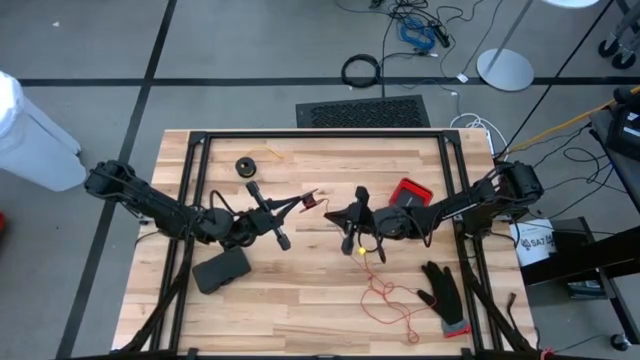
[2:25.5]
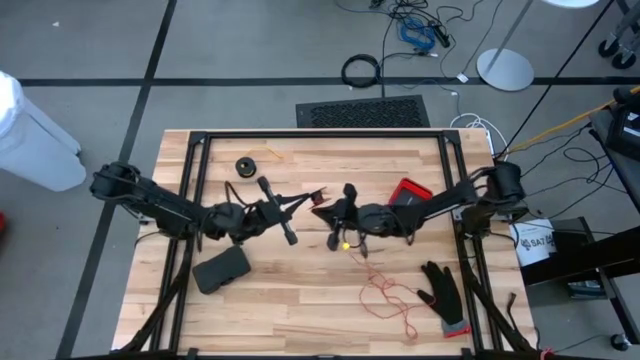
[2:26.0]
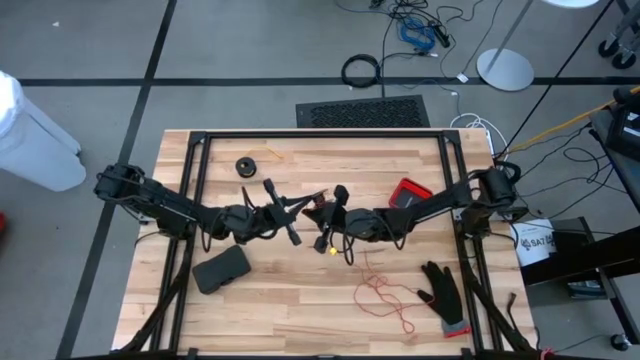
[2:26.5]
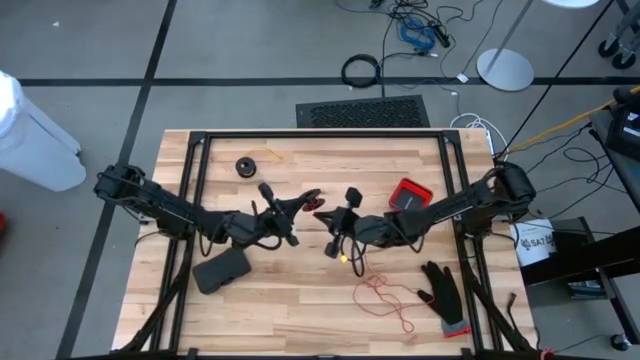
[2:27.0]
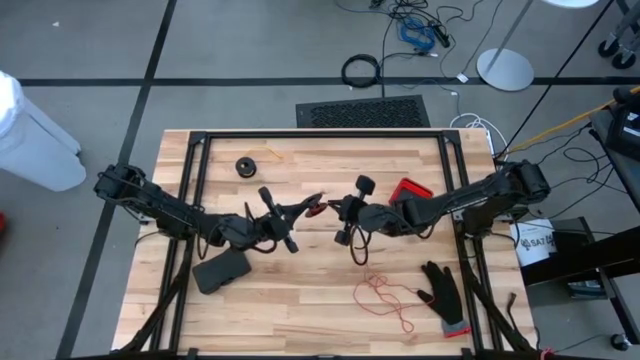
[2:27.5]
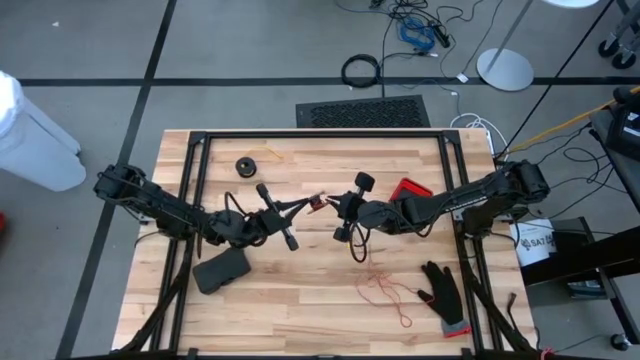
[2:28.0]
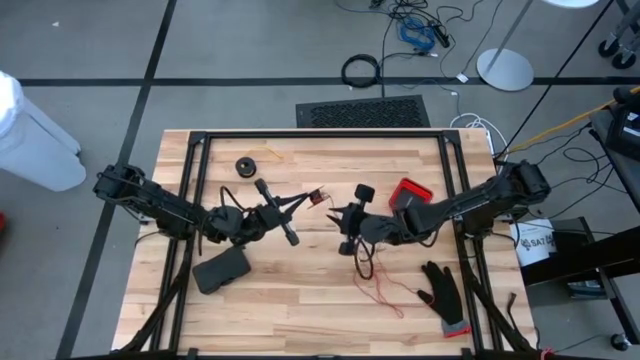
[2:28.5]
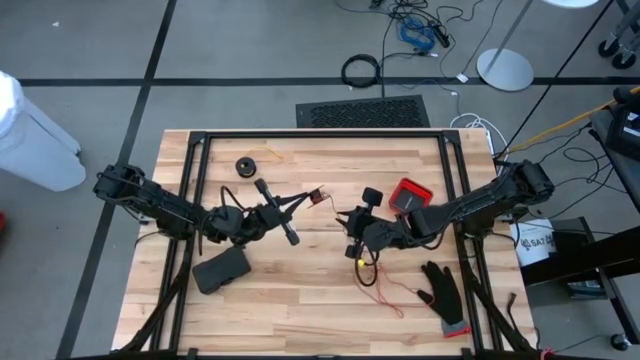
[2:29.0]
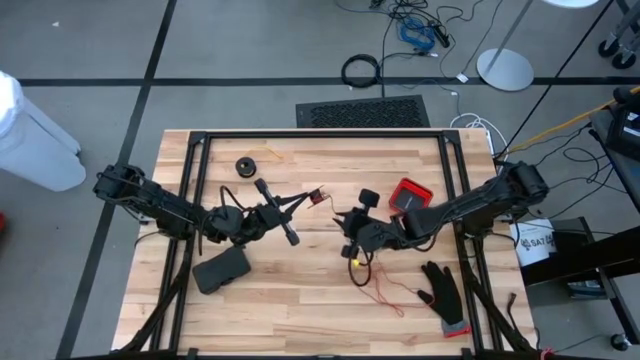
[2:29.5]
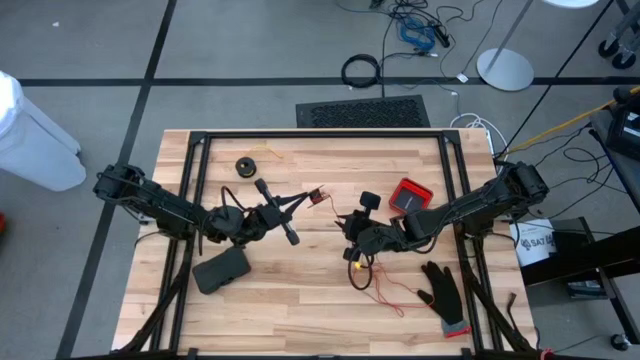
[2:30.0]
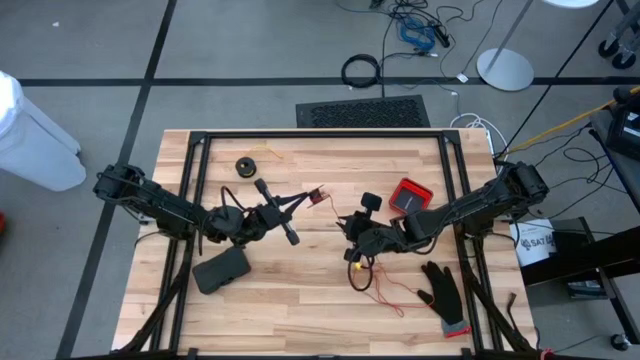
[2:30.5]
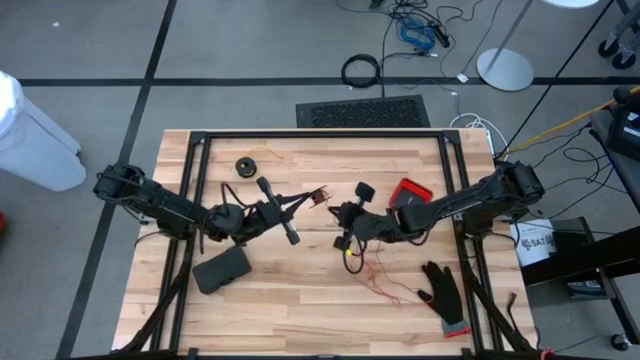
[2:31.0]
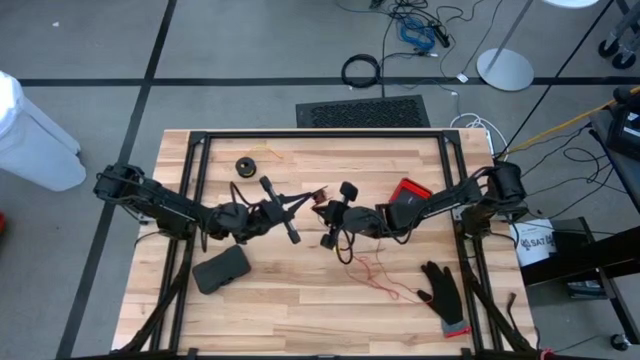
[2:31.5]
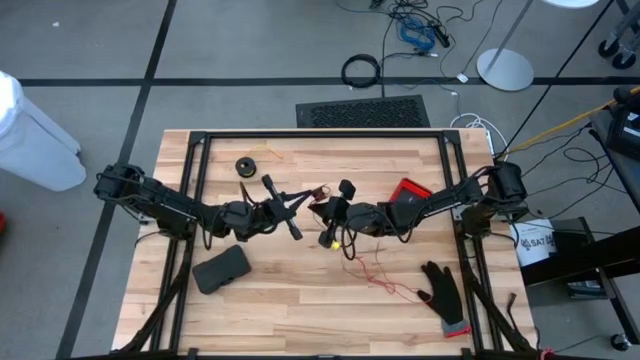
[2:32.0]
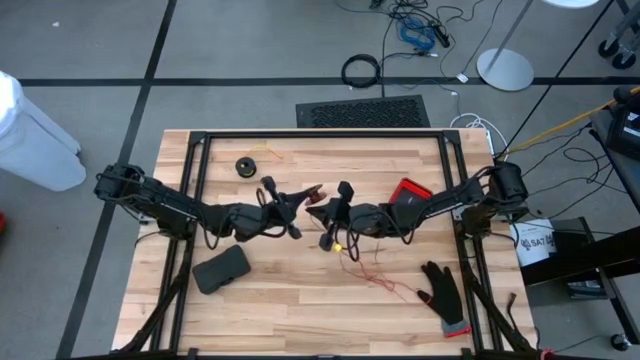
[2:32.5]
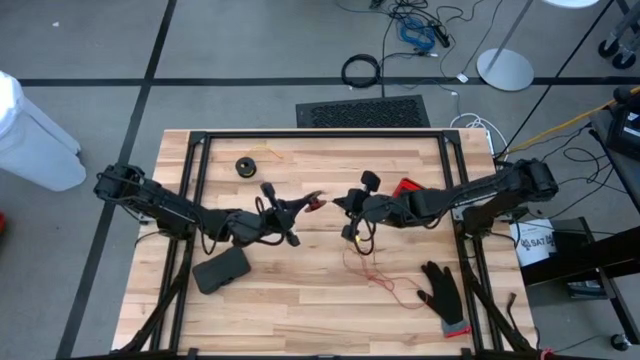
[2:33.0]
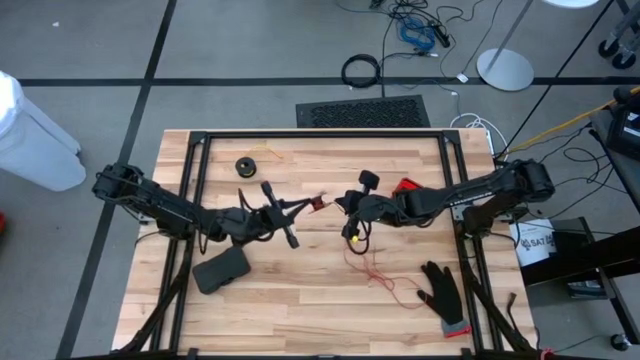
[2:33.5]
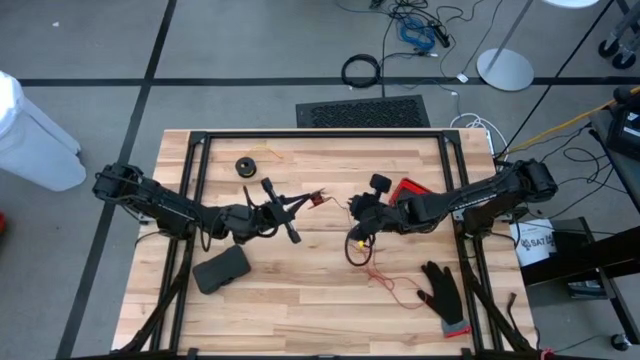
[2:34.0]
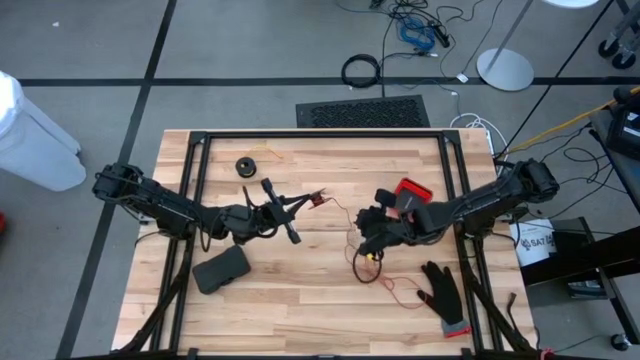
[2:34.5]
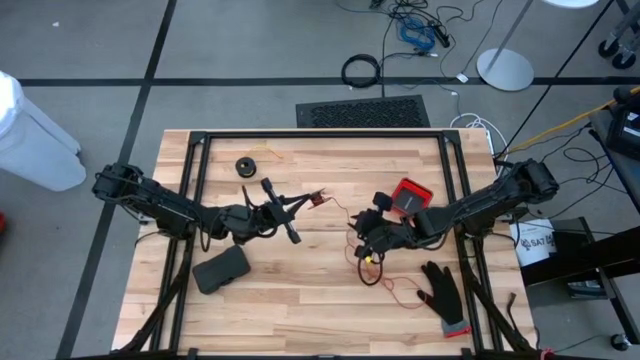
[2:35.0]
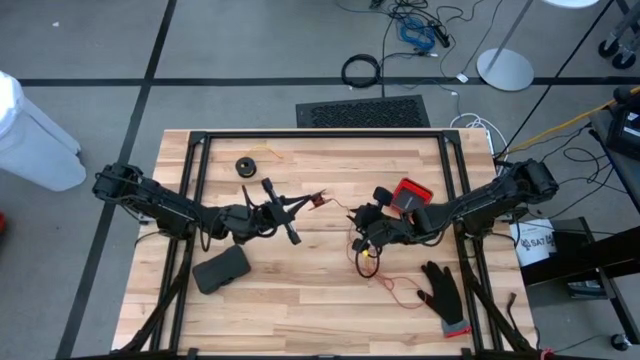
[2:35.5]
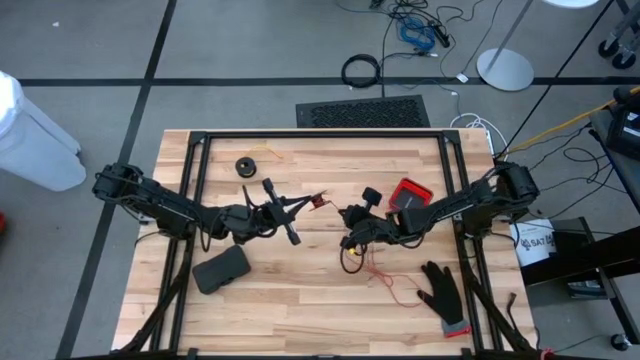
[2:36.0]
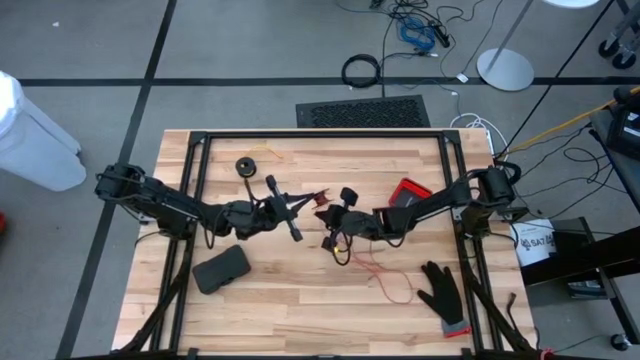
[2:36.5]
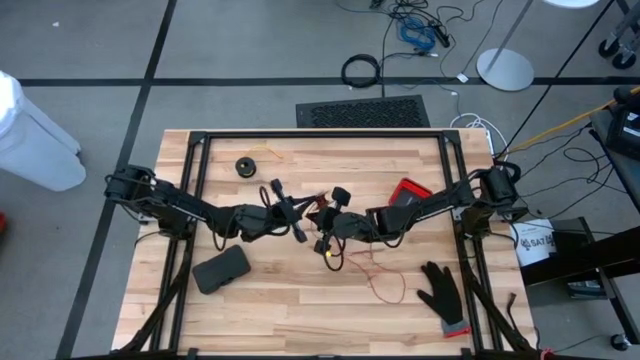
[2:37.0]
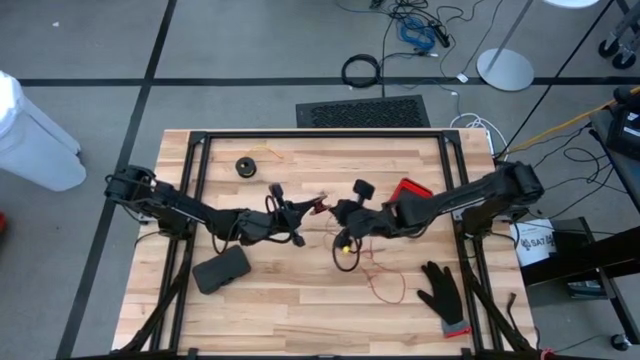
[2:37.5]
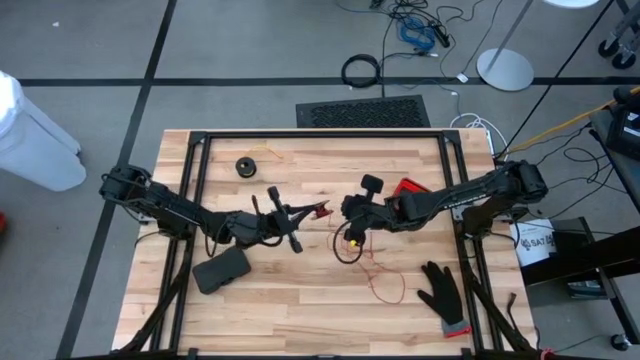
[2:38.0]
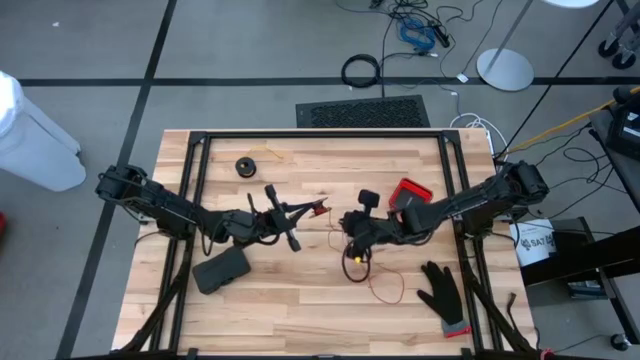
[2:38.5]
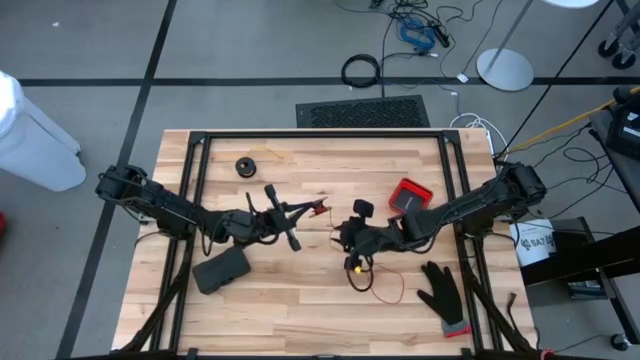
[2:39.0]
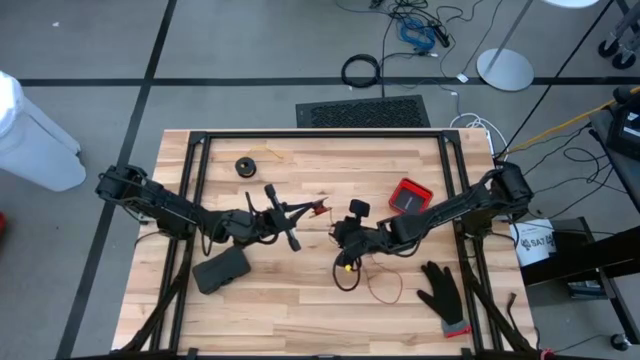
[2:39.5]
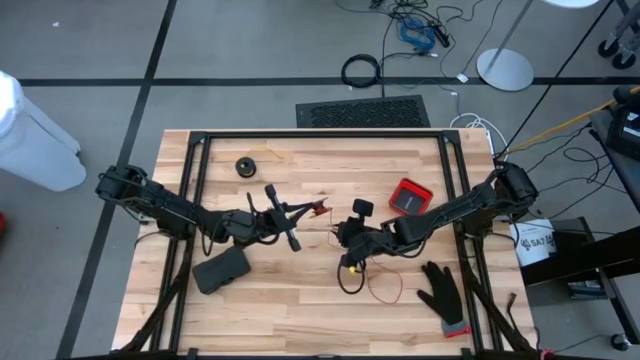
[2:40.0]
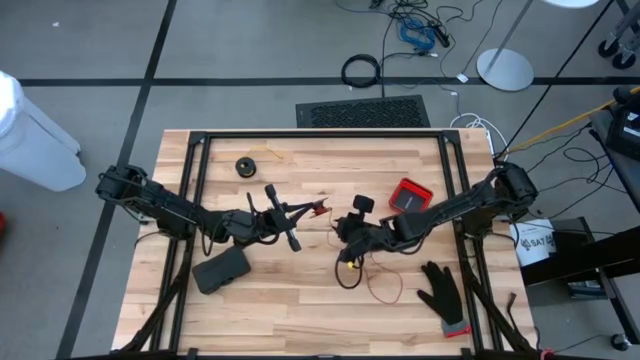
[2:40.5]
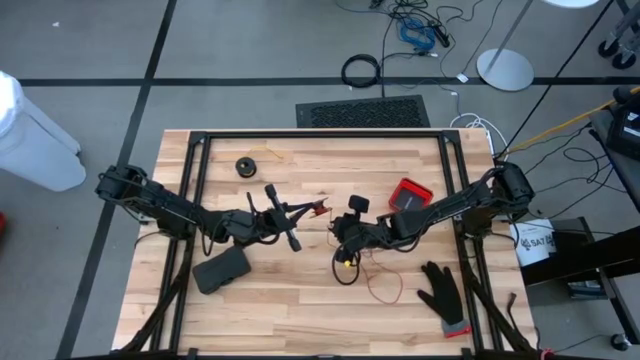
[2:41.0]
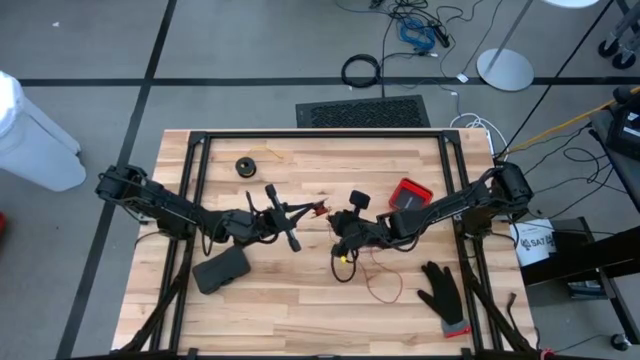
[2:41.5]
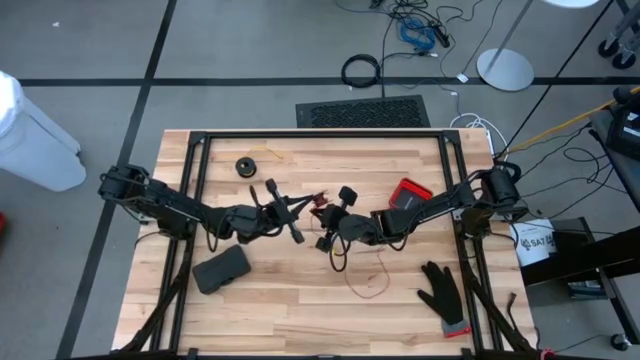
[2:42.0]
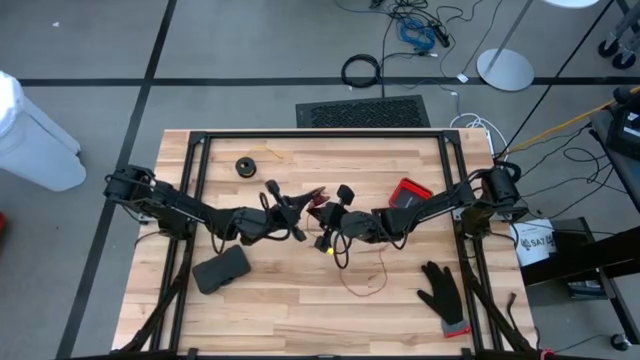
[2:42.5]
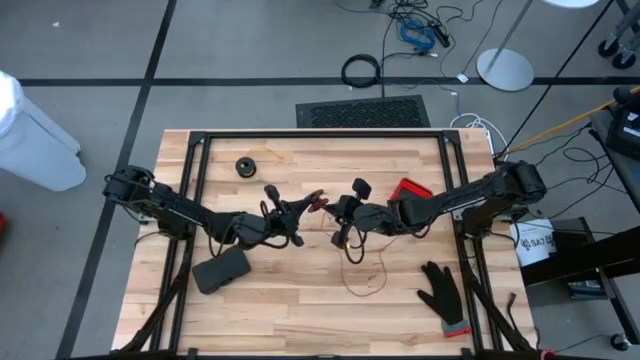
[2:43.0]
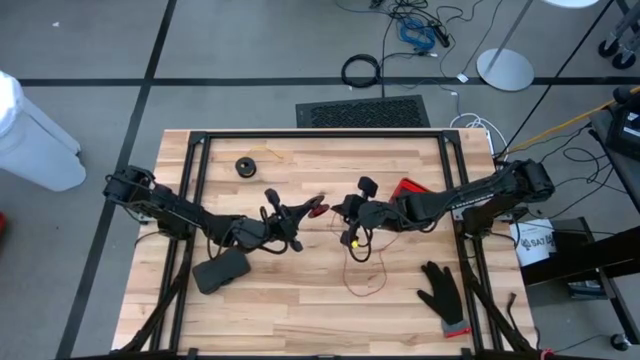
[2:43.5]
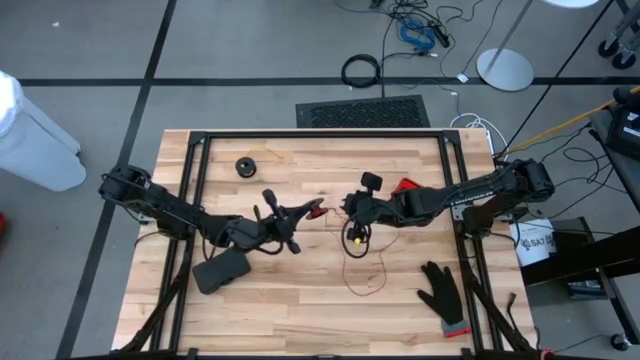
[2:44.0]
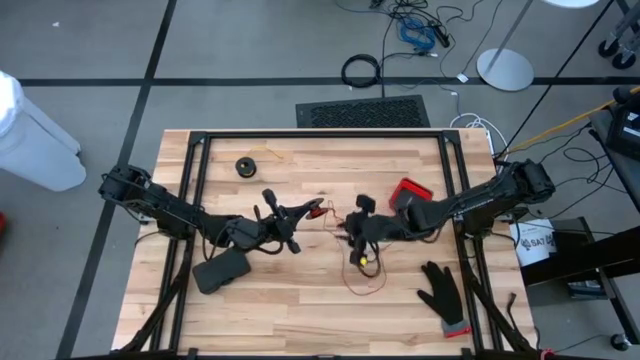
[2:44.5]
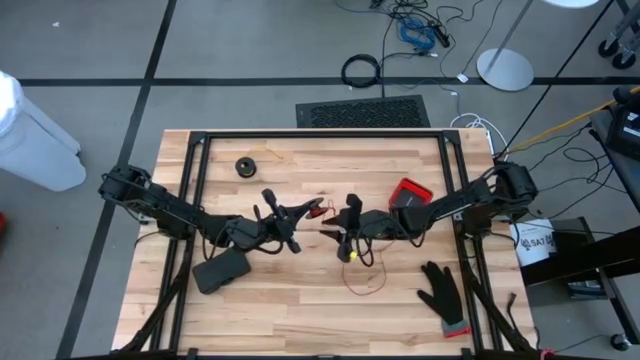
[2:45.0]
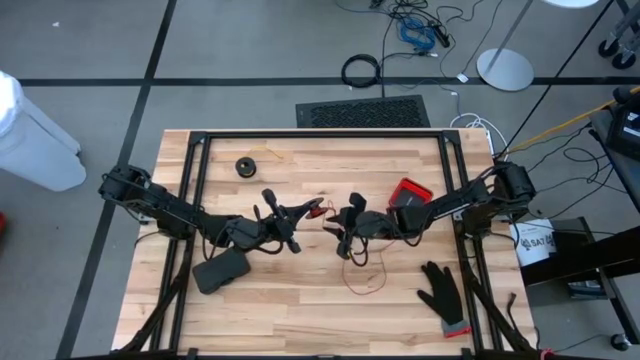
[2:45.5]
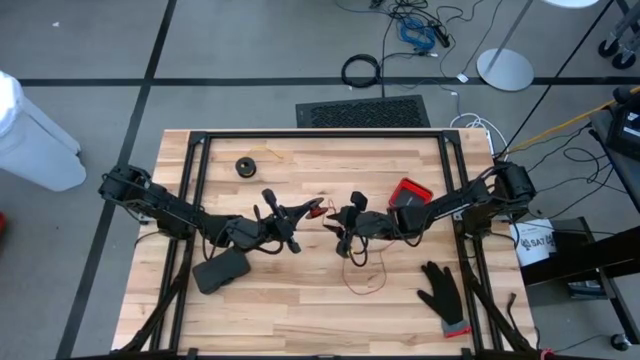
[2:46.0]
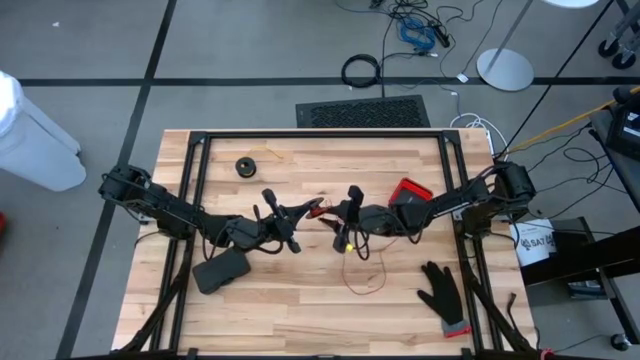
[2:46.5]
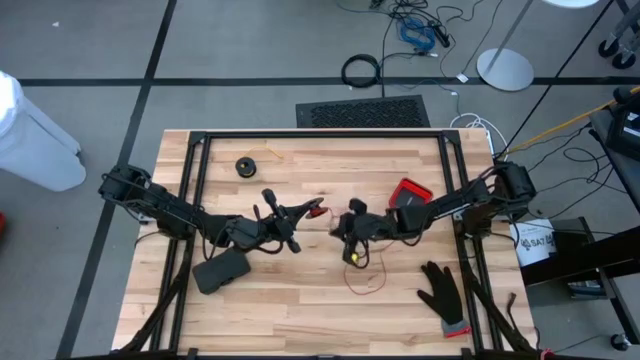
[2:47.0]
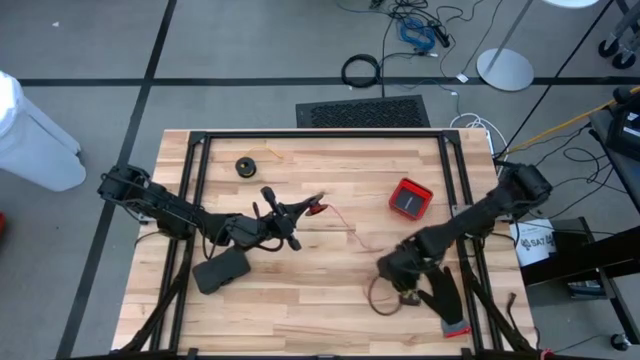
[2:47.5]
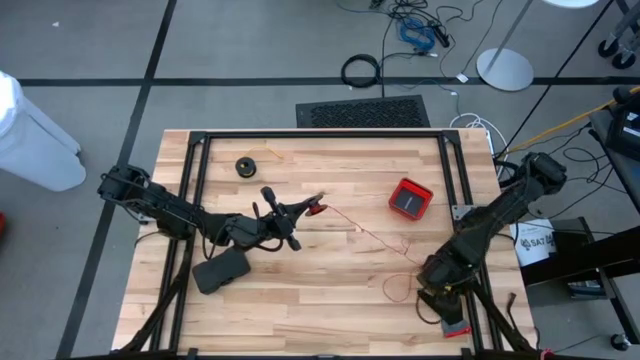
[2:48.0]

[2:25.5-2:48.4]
Task: Coil cords
Coil the red wire onto the black spool
